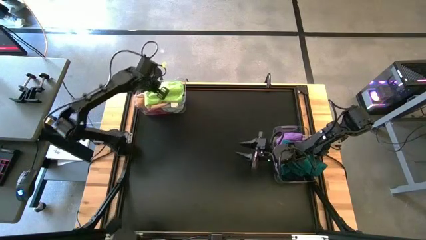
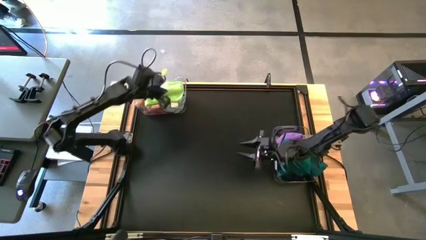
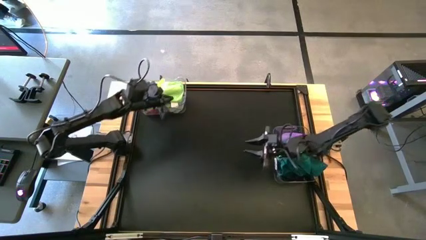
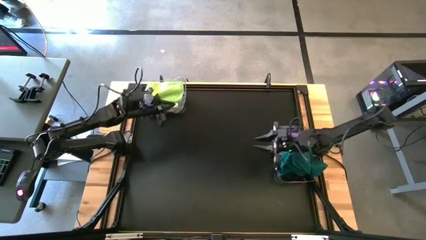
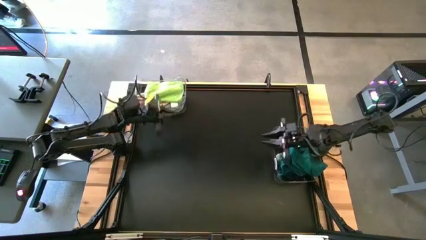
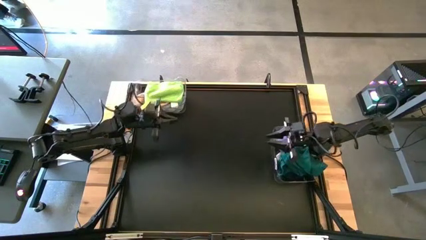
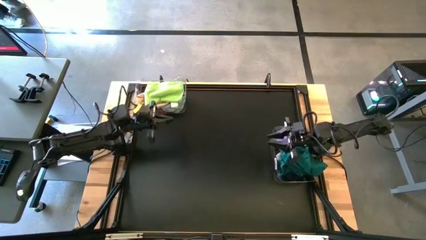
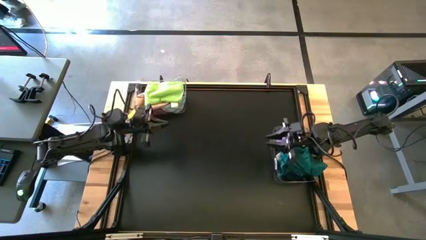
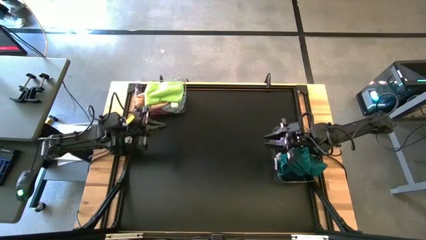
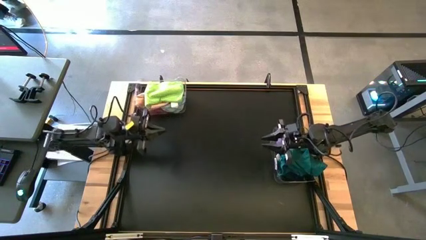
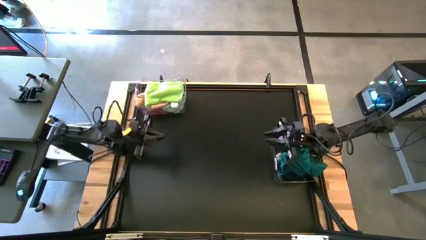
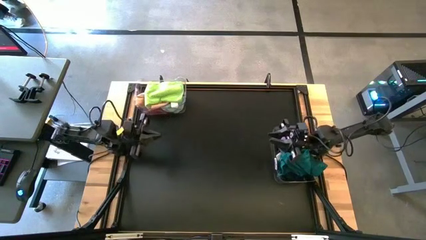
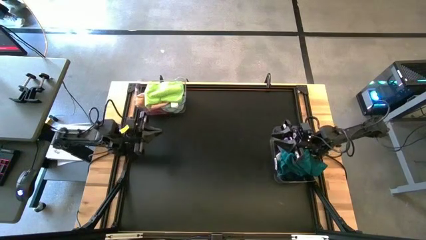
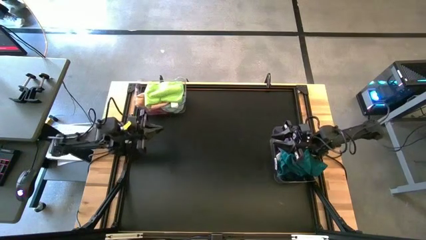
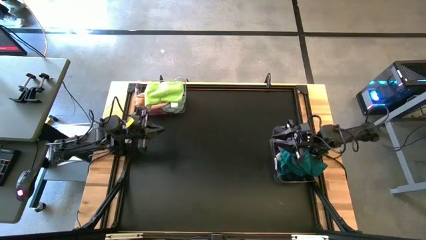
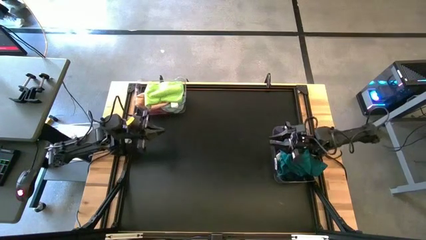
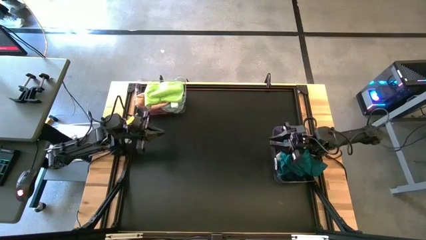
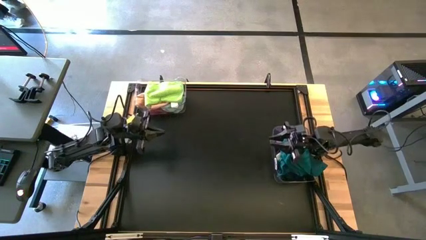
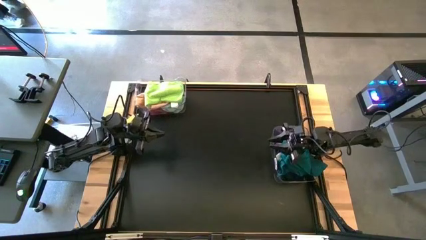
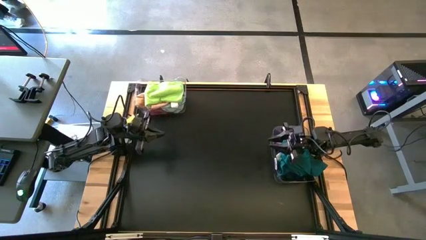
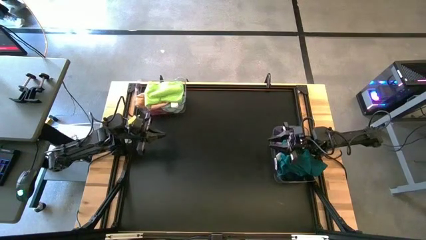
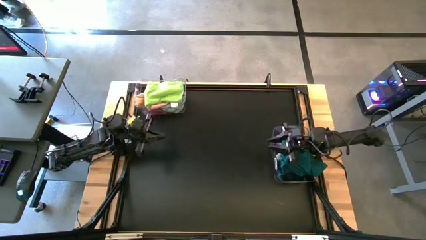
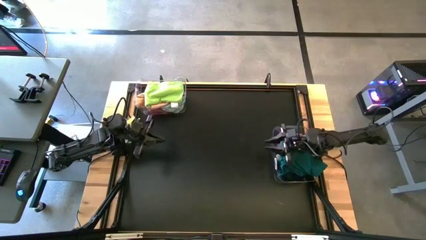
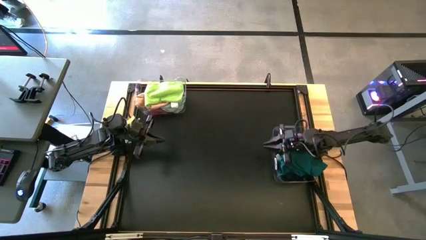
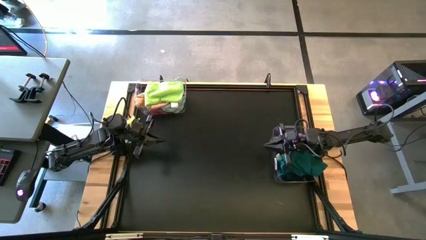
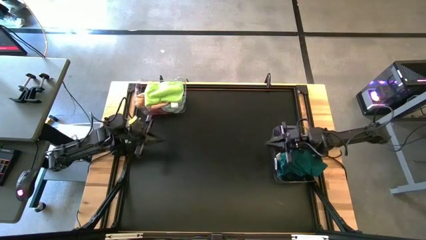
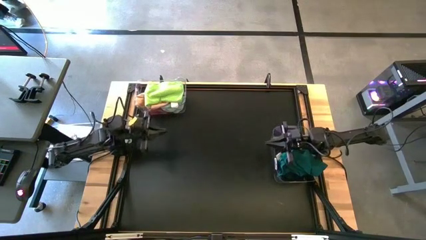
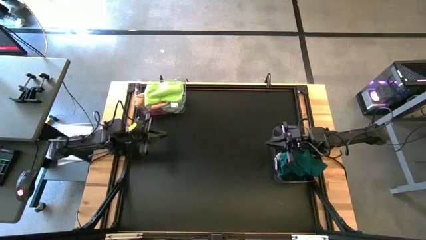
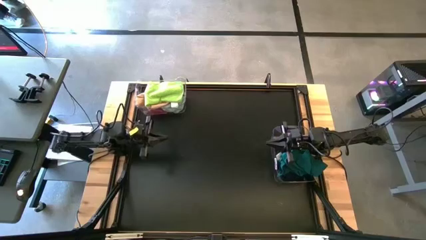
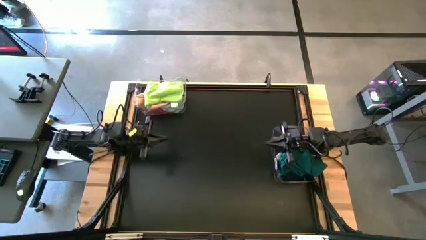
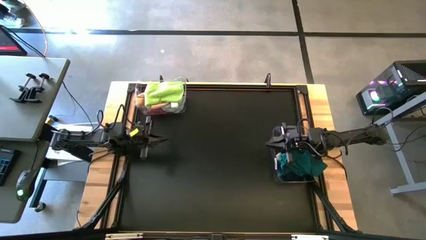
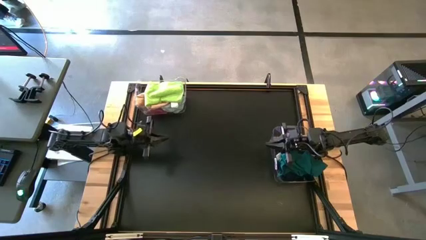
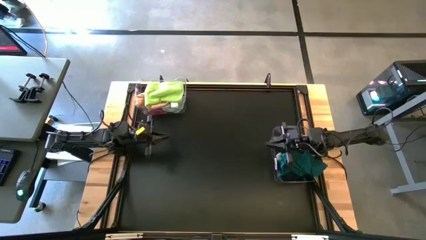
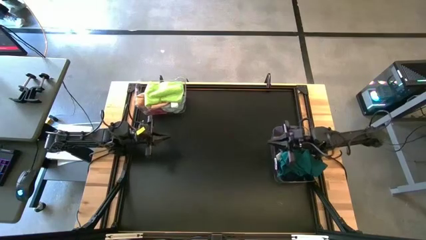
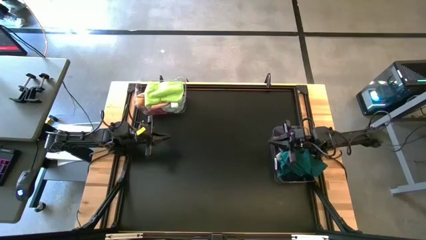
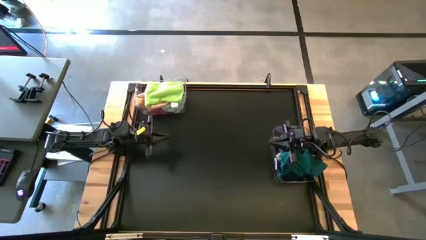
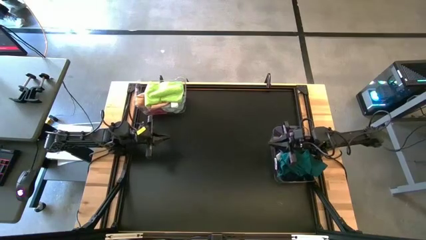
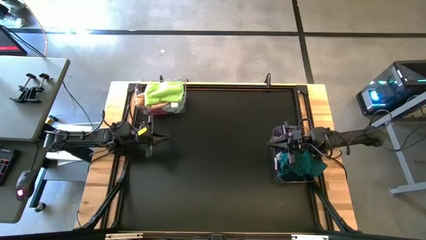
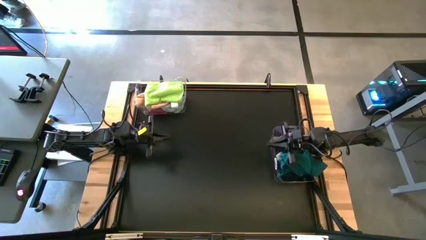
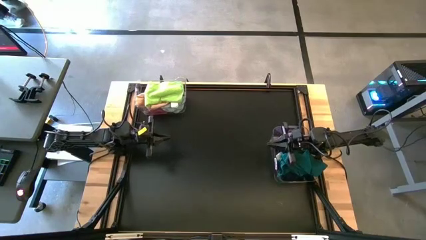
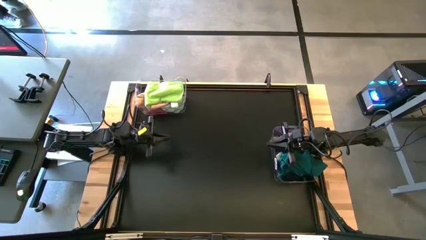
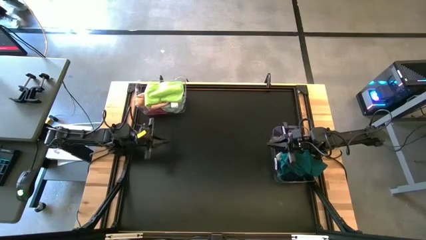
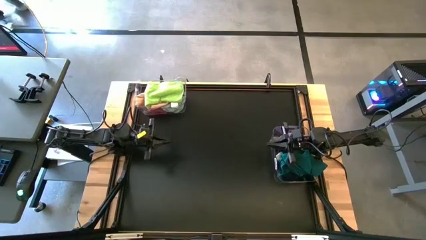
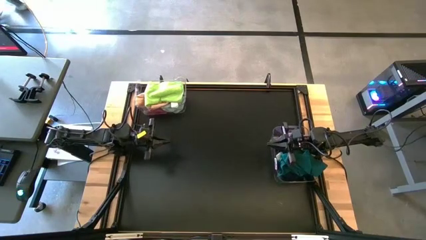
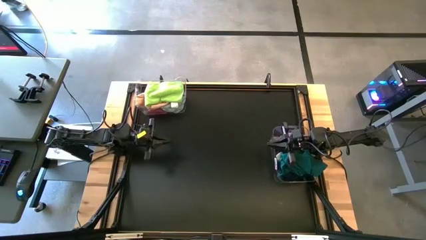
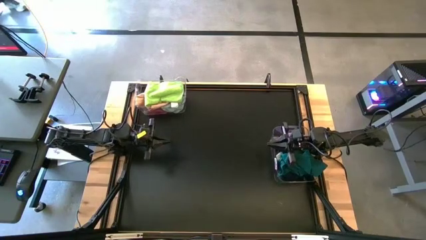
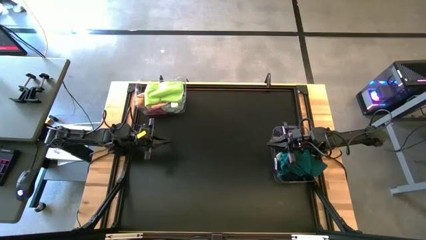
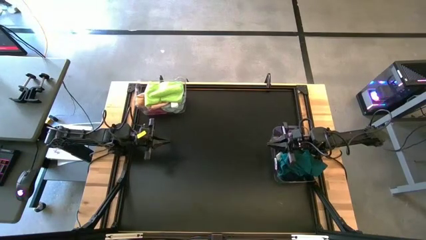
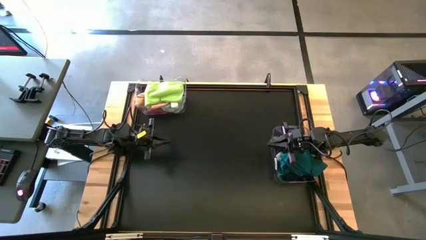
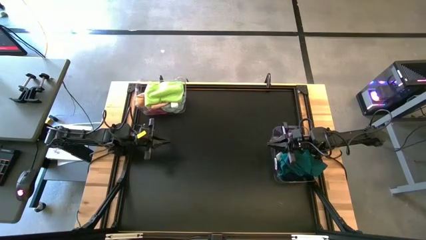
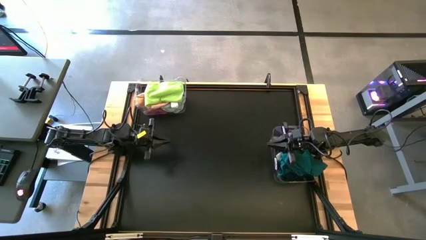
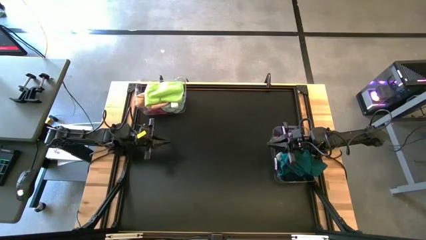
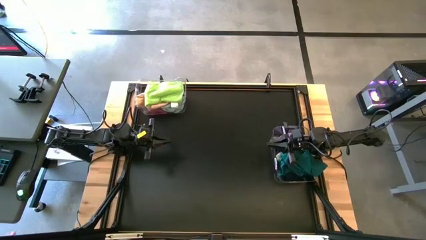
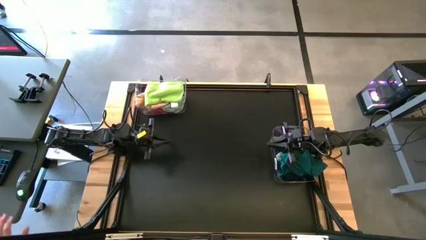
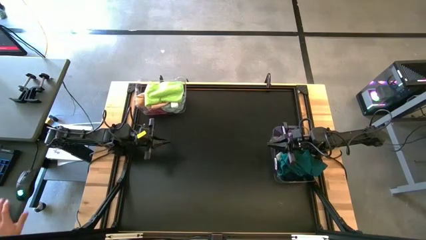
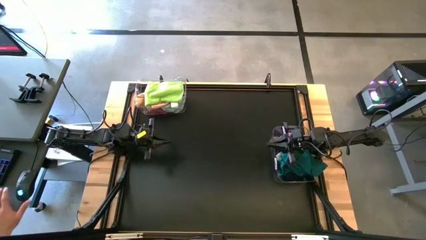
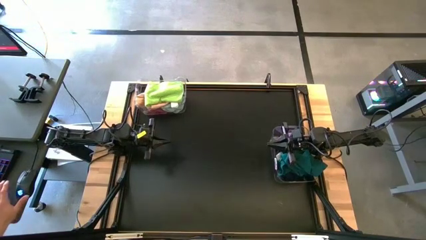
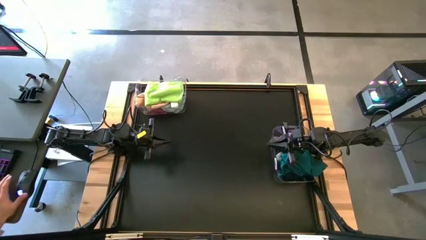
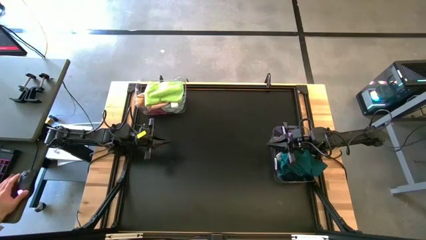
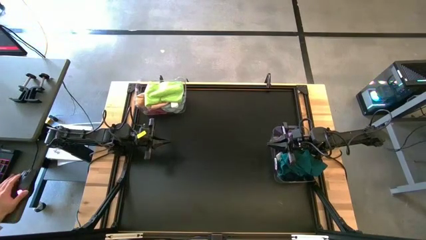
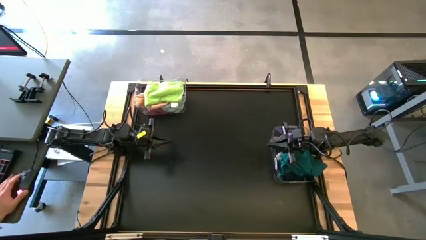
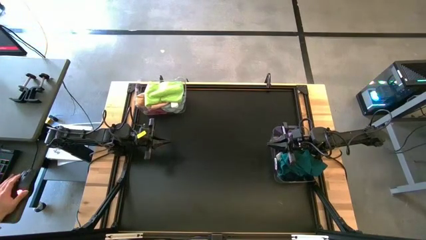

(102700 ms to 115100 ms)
Task: Sort towels by color in basket
Return to Home Position
